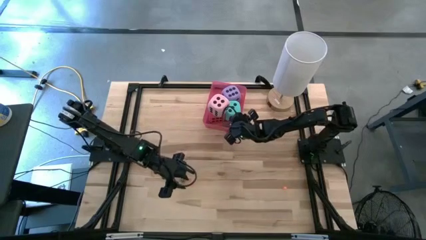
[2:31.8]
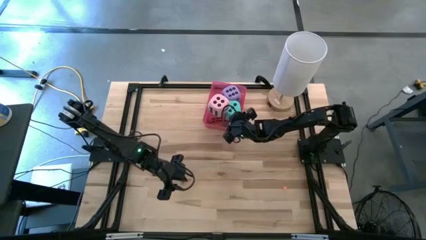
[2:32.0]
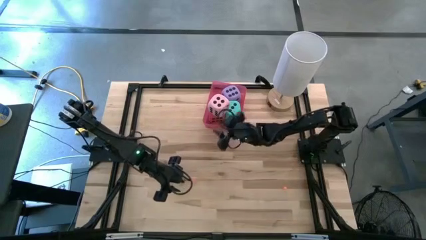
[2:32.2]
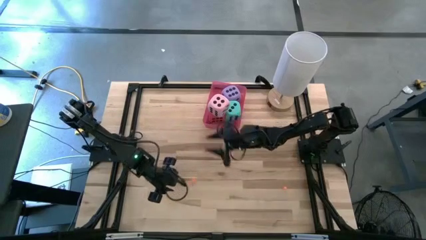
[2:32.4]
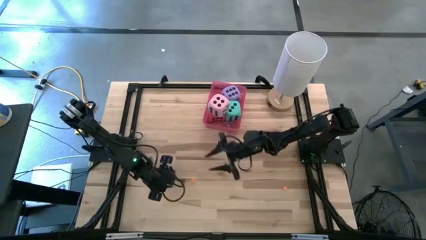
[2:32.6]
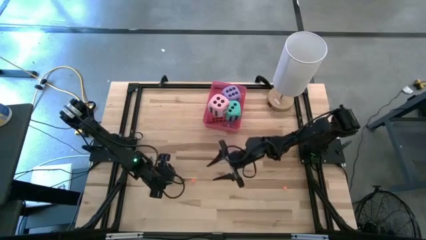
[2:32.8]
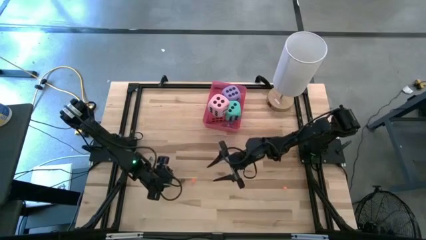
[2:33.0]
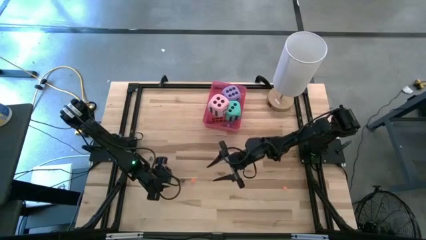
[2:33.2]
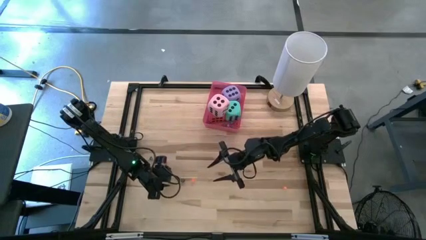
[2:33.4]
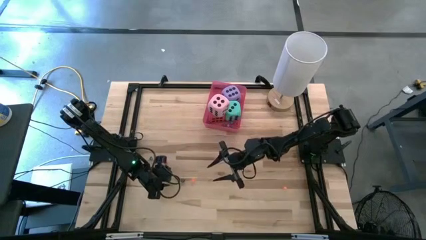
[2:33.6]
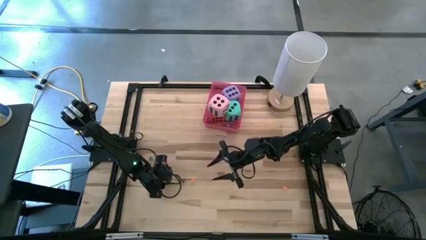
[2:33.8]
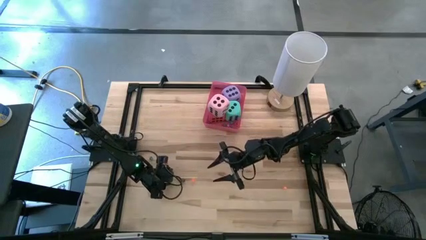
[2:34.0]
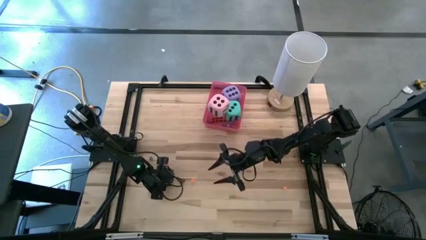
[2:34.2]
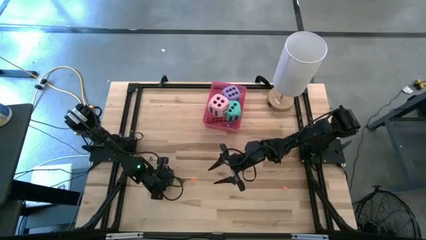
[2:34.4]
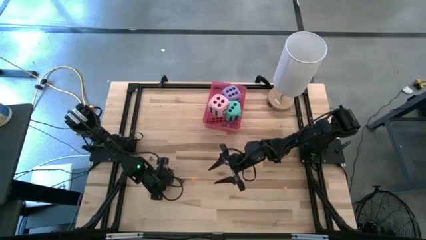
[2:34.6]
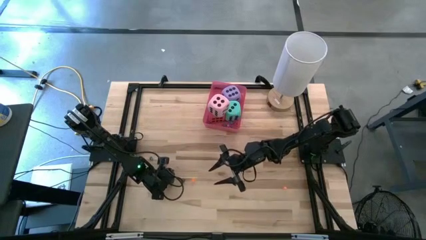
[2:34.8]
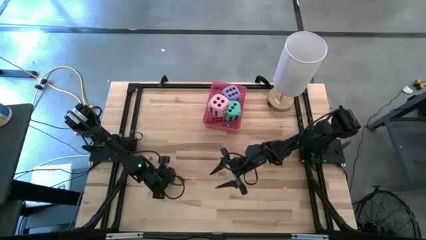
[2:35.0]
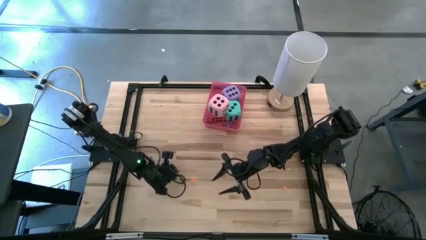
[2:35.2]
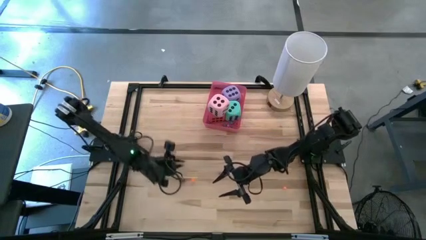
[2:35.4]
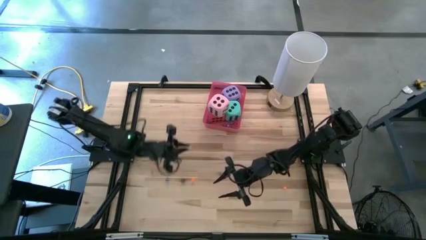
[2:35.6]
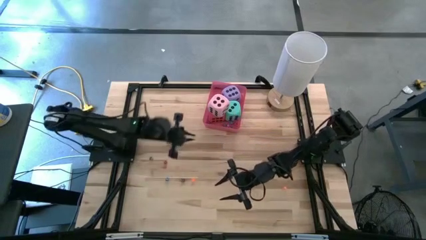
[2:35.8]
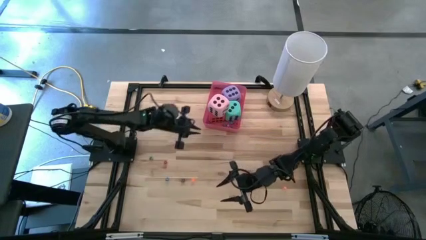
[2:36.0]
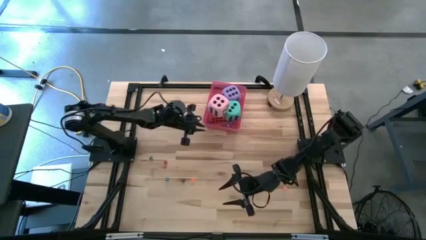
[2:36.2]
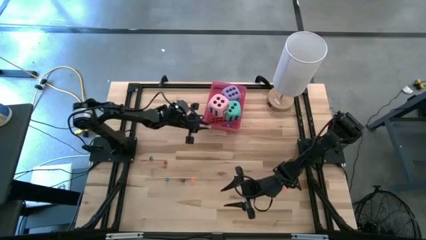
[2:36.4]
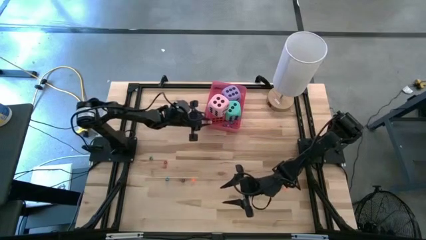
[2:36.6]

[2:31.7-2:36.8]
Task: Pick & Place Dice
Put the small light green dice into the bin

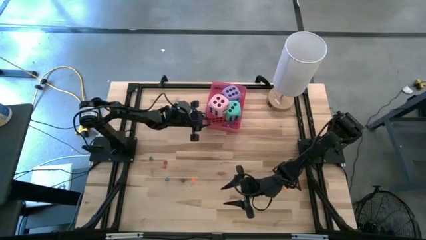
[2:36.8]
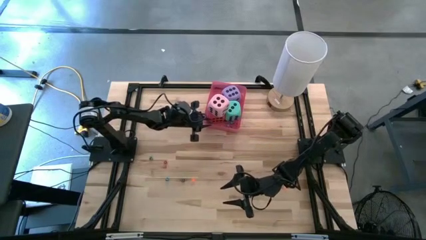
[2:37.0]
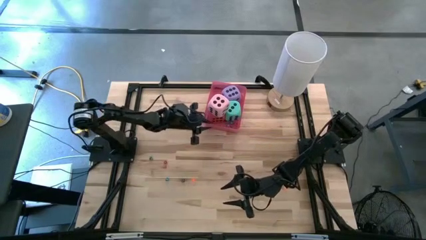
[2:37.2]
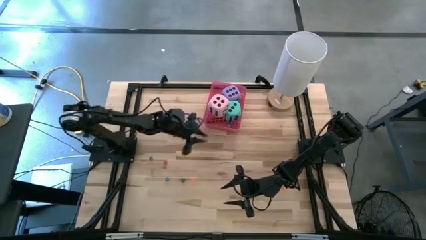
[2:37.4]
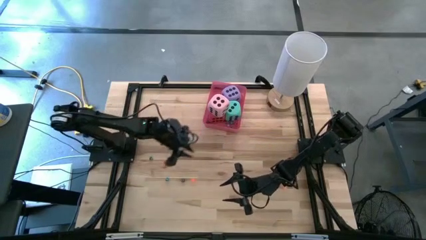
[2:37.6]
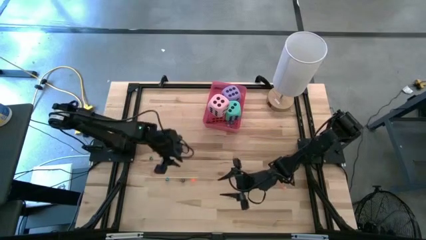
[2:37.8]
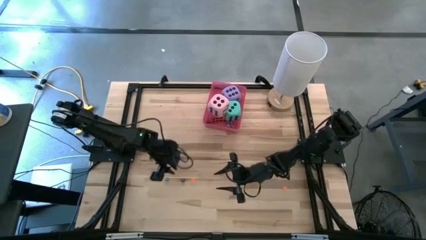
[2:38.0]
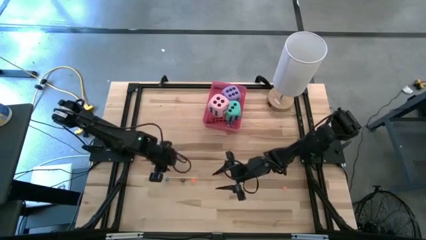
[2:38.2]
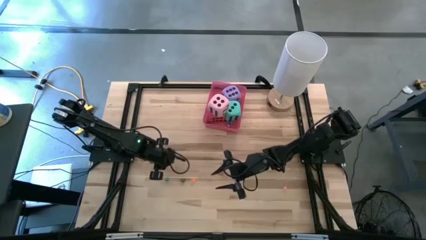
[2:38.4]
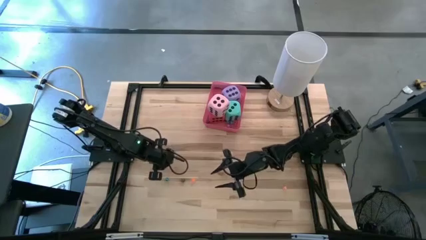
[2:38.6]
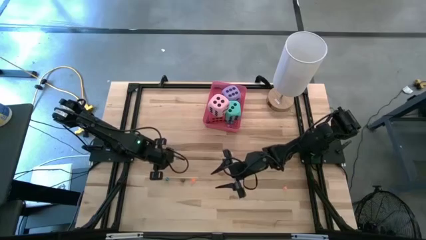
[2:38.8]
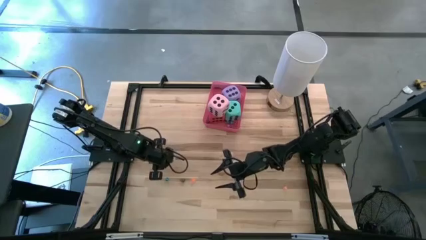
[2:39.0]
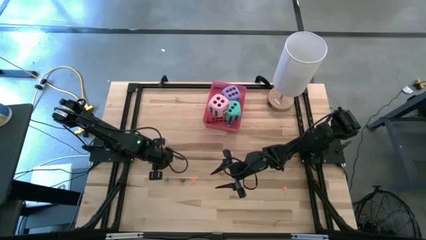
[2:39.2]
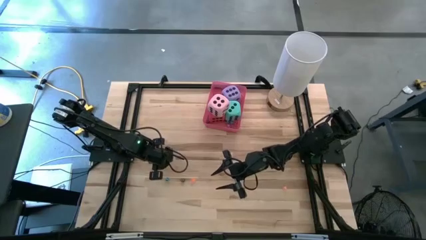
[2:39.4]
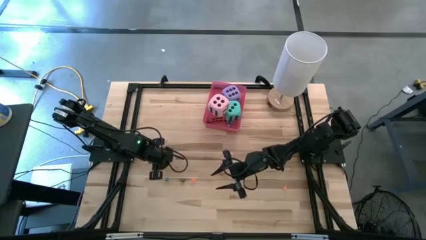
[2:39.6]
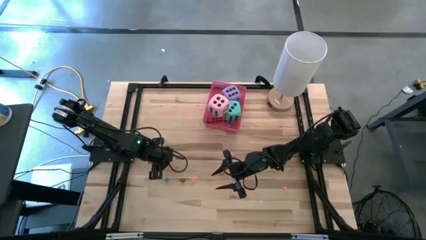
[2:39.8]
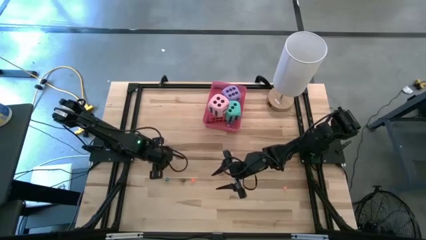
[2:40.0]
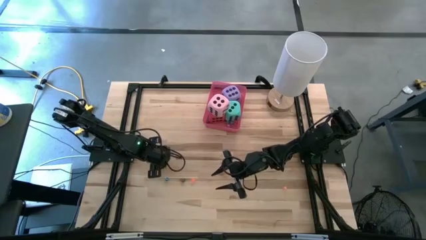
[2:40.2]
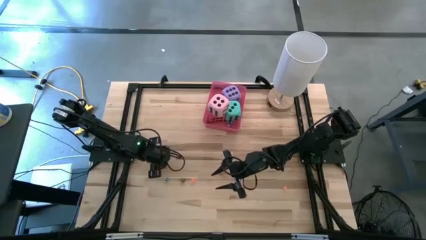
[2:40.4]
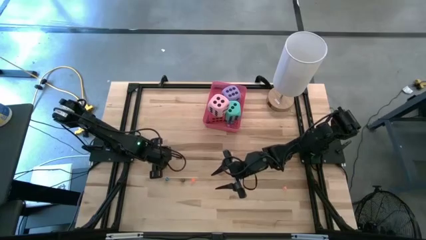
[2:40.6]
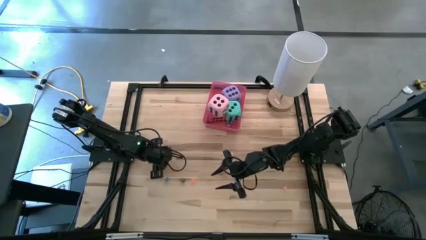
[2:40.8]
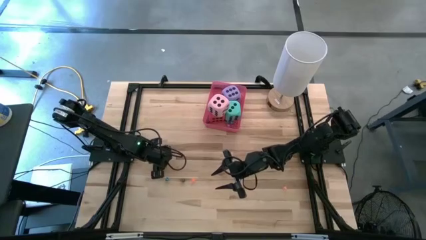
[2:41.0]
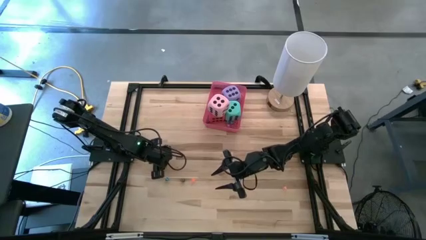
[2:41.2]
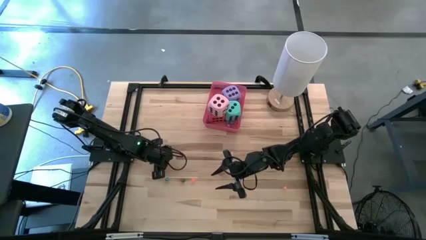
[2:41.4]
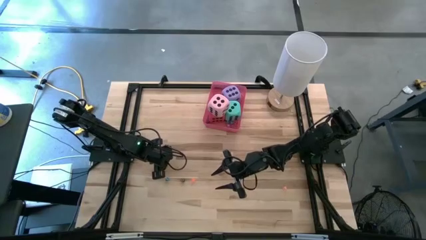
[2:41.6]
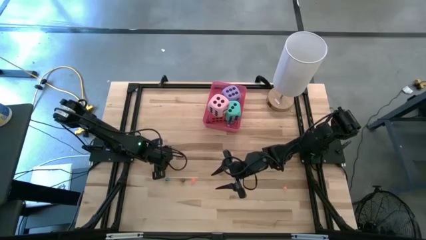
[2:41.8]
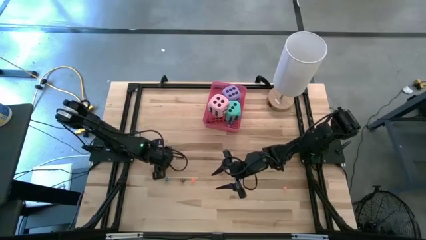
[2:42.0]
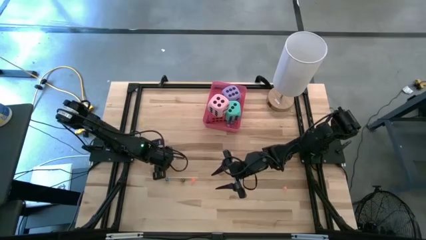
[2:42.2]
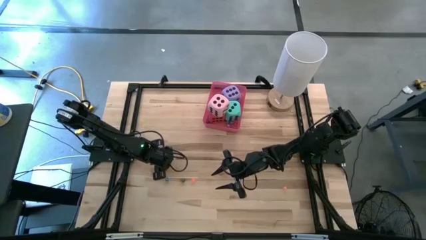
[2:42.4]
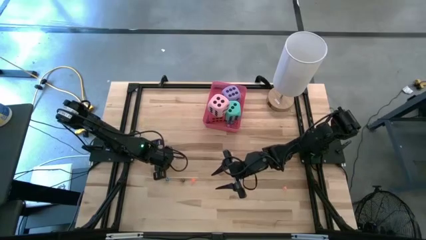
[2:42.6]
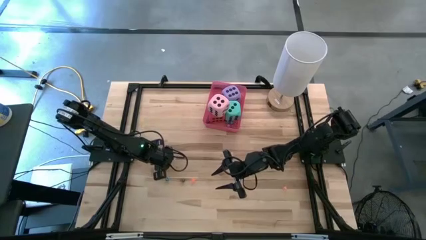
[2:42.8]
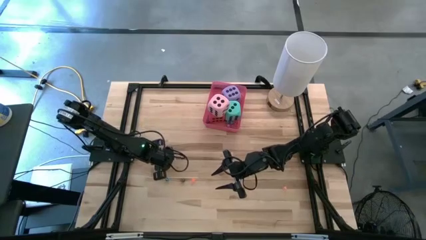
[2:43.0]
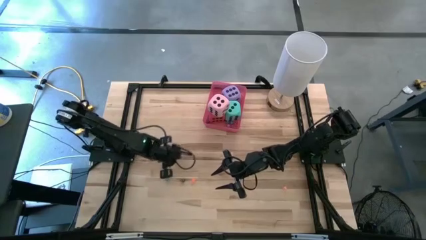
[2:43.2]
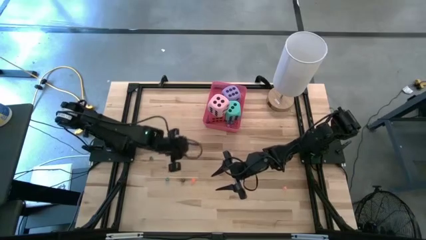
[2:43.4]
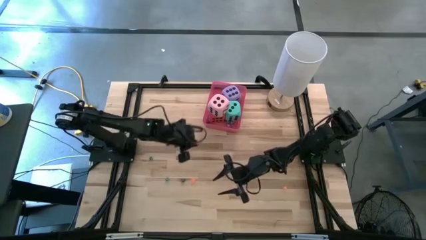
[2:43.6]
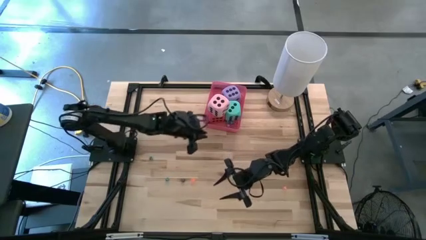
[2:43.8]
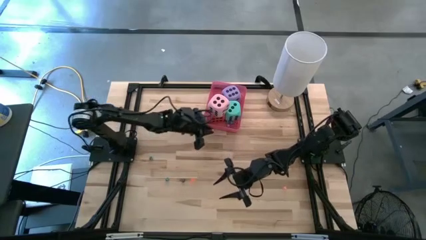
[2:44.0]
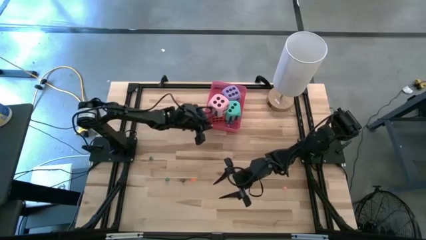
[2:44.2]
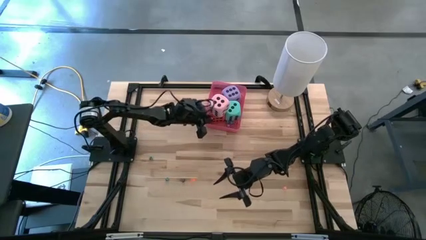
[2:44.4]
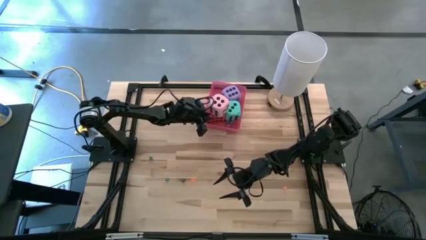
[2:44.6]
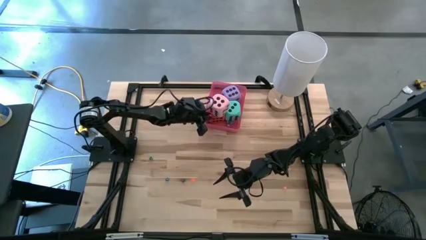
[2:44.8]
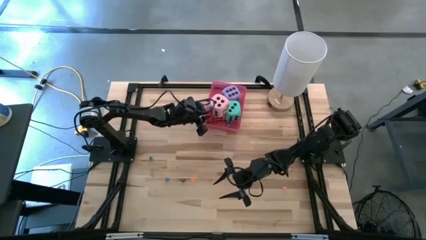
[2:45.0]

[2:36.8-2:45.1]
Put the small red dice into the bin

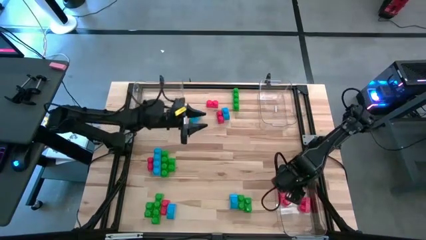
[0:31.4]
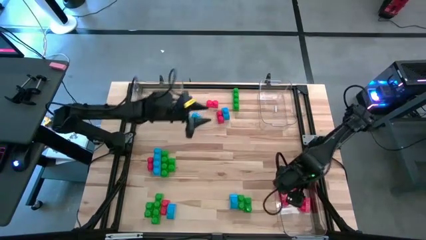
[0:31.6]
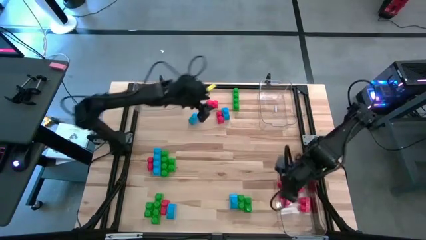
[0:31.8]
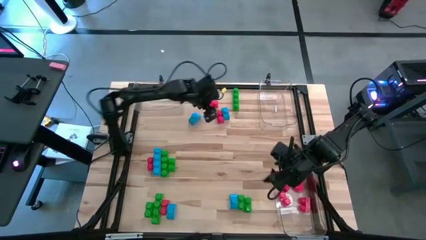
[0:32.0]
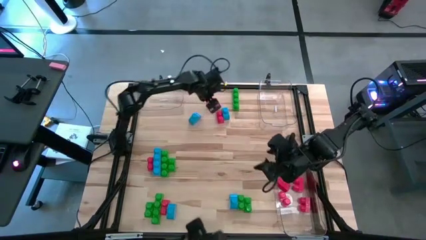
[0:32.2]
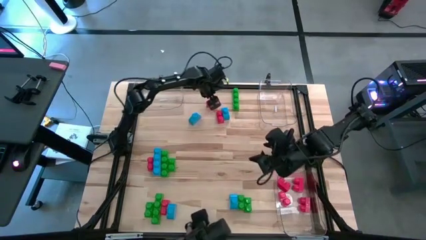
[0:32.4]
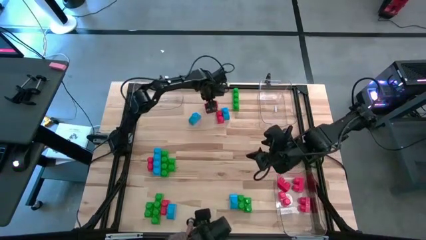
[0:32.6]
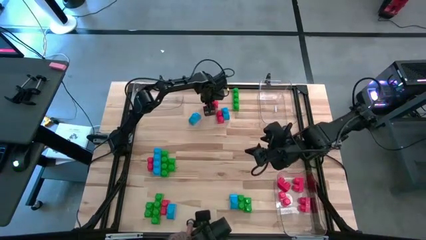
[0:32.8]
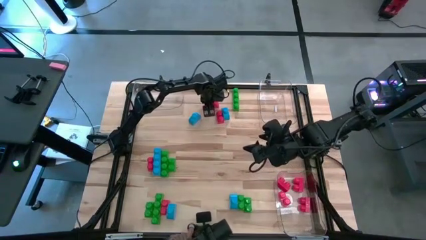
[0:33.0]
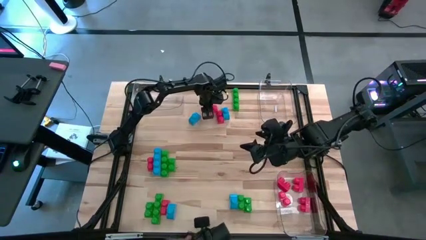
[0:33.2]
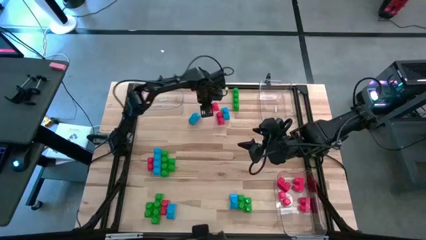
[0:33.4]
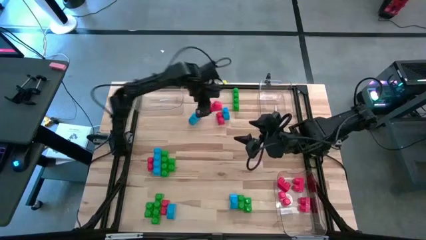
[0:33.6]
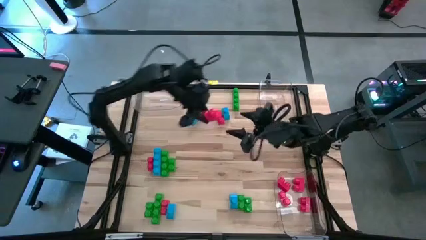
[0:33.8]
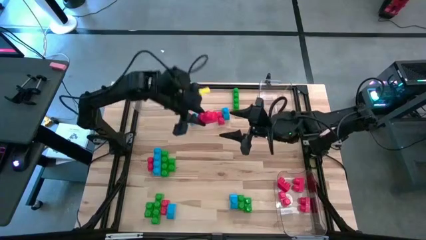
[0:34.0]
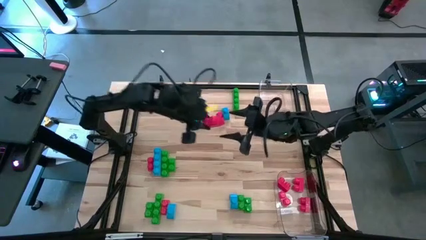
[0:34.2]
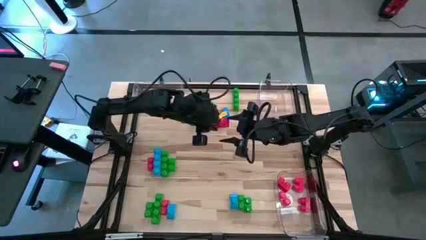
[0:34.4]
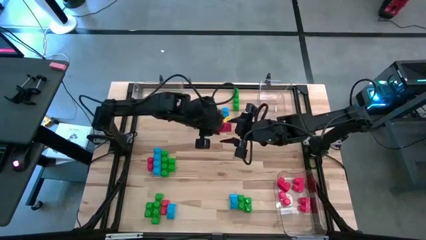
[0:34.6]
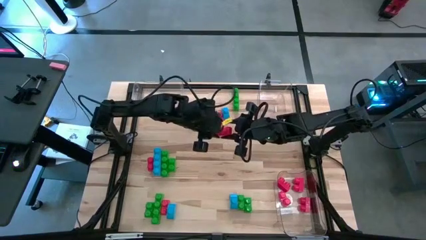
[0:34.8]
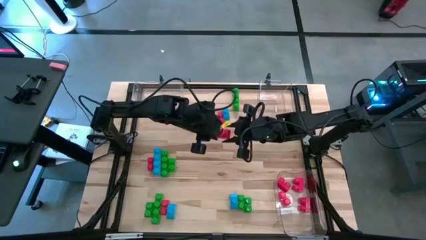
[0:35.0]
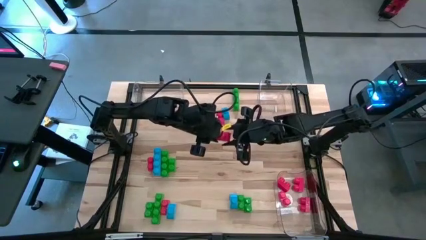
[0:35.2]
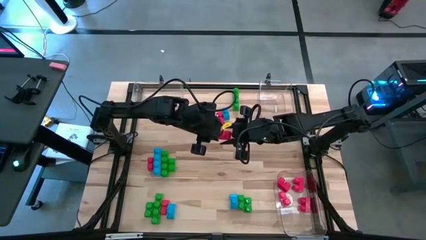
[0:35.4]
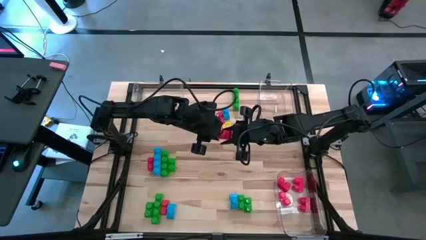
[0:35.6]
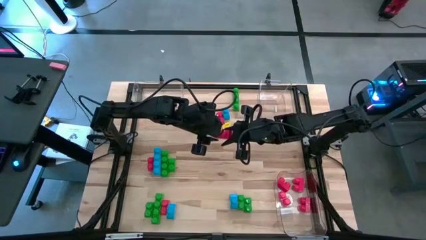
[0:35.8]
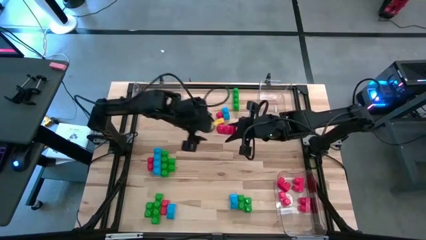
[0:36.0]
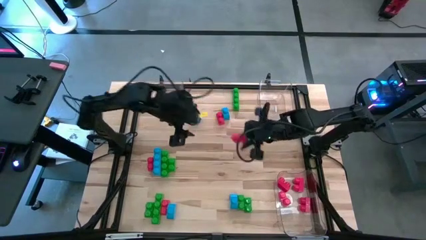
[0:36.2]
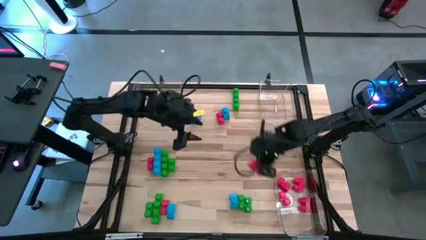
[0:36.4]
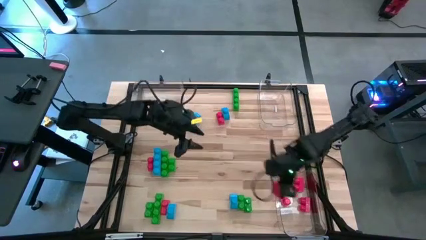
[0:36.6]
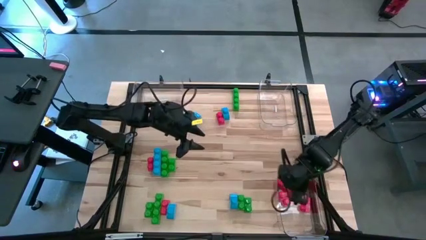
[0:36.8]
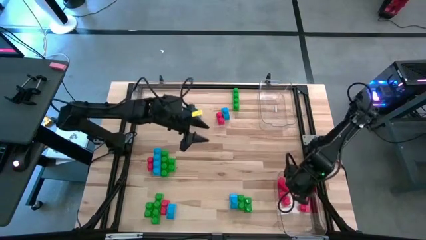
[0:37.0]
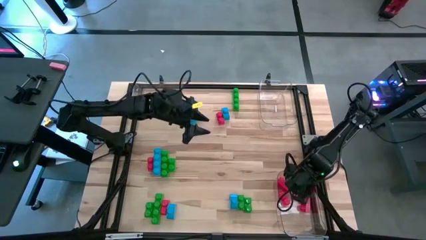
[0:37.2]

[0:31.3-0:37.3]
Task: Sort blocks
Put the red game piece into the bottom right transparent bin
